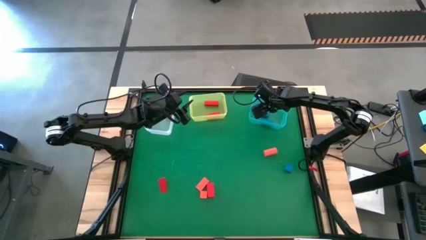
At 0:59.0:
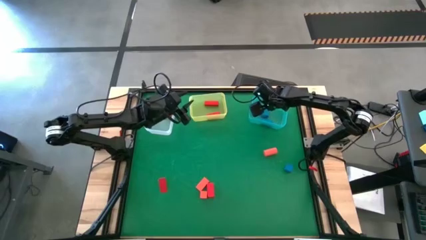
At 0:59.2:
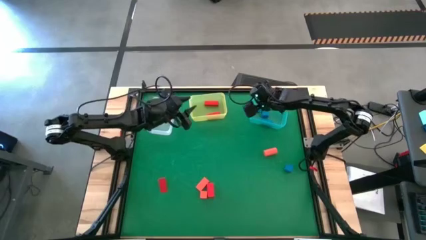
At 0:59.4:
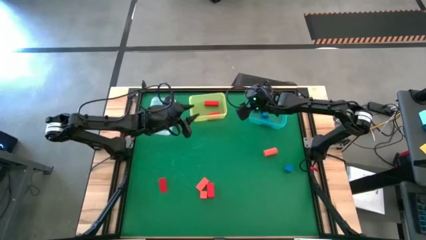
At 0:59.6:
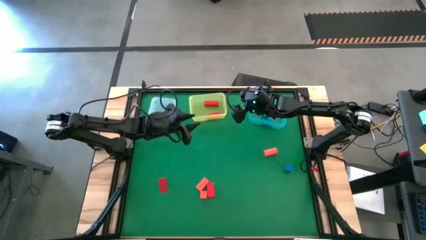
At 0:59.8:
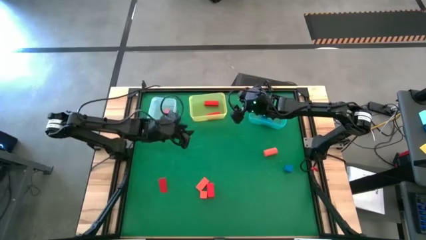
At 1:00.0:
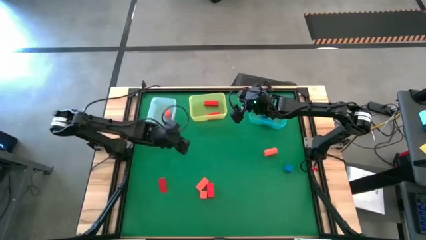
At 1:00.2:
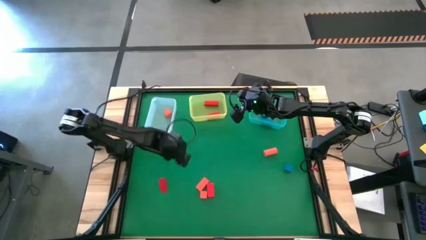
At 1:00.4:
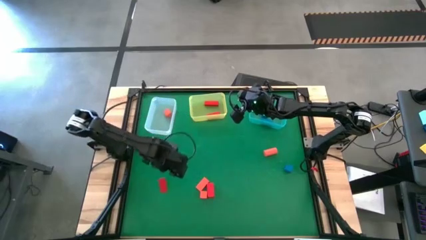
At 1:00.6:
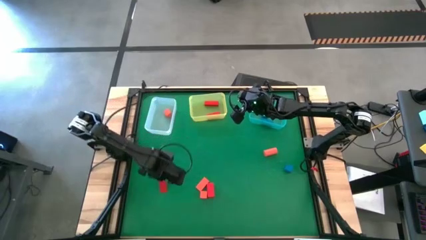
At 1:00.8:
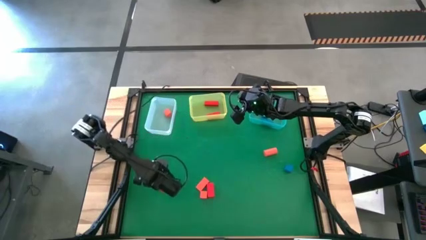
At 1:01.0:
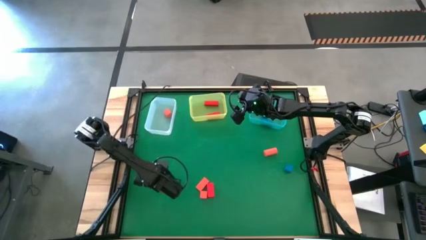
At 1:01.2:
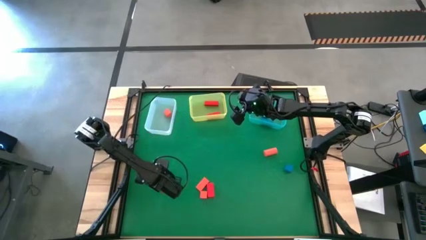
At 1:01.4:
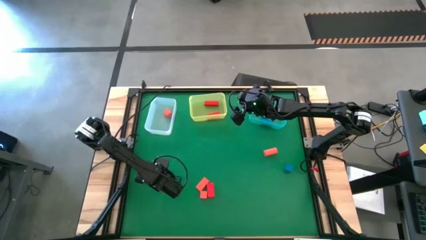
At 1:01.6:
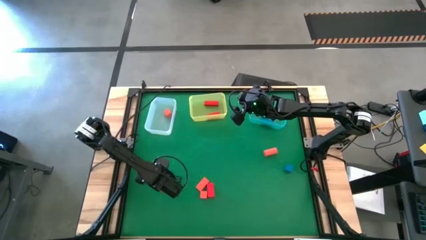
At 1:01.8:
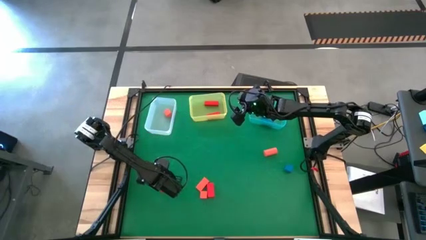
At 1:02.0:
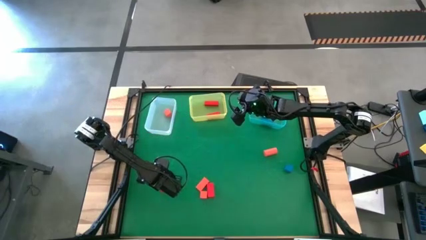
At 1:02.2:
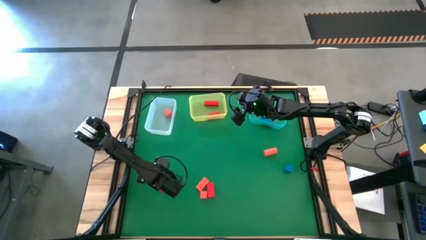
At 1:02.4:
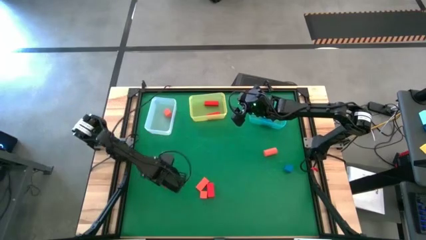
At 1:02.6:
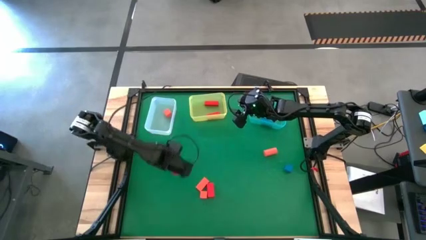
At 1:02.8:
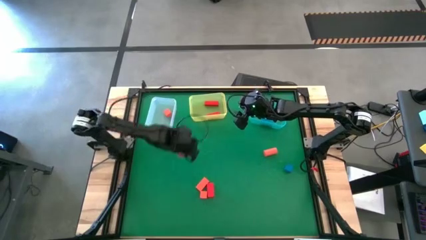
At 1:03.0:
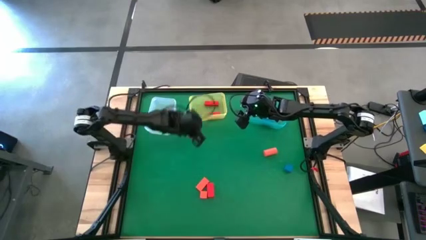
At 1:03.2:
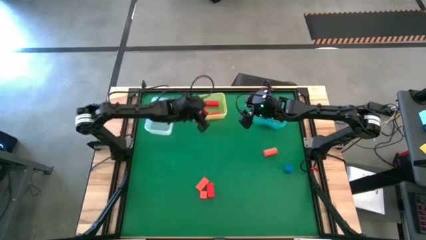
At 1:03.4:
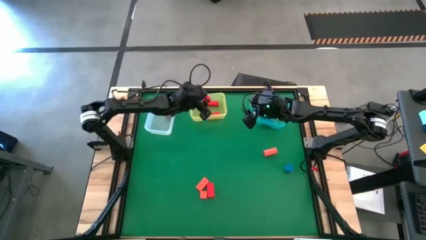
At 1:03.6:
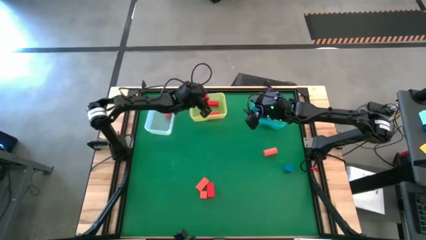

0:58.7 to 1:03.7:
Task: Sort & place blocks by color
Put the red block into the yellow bin

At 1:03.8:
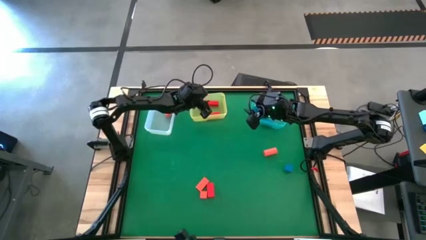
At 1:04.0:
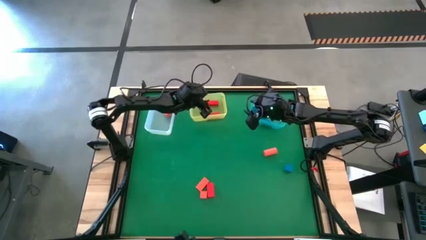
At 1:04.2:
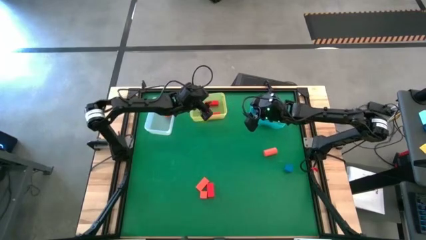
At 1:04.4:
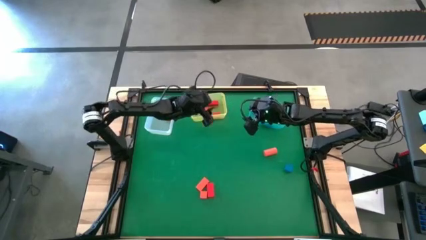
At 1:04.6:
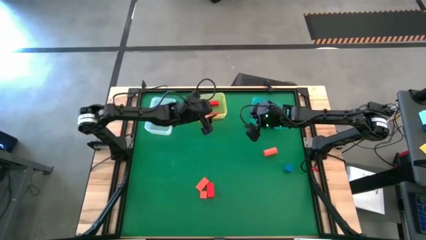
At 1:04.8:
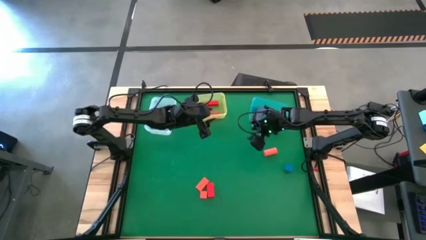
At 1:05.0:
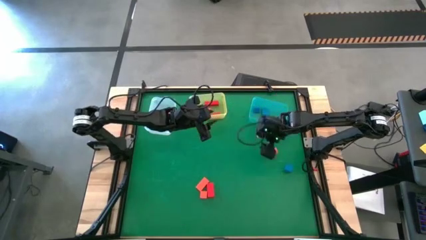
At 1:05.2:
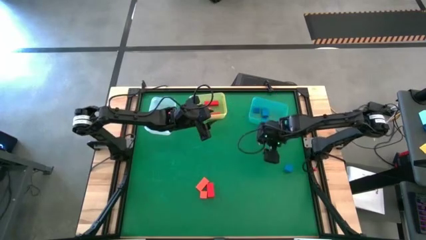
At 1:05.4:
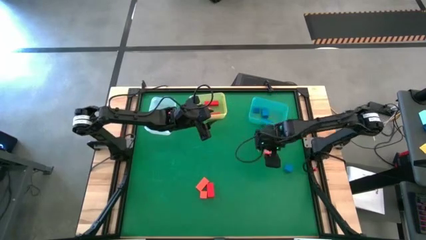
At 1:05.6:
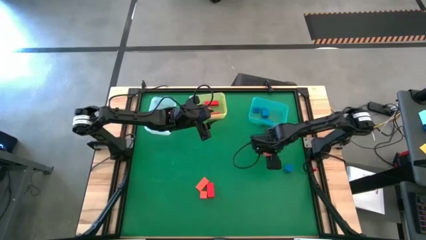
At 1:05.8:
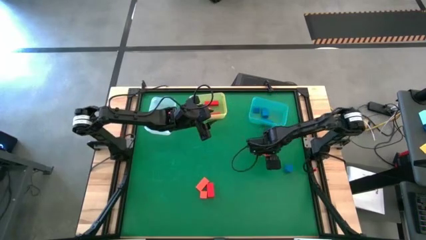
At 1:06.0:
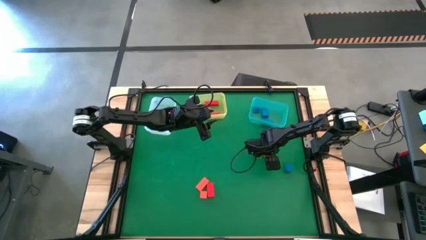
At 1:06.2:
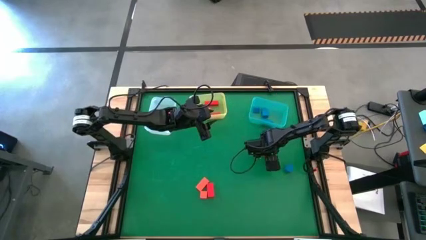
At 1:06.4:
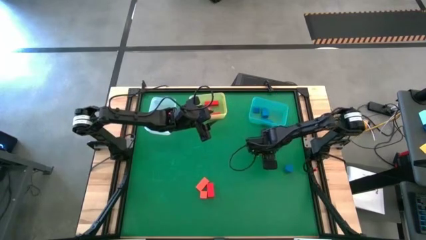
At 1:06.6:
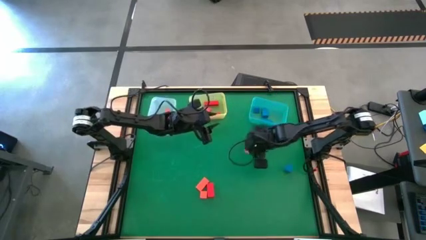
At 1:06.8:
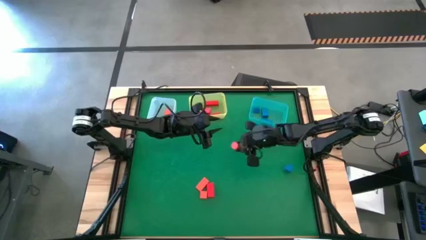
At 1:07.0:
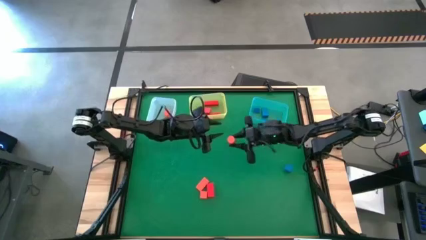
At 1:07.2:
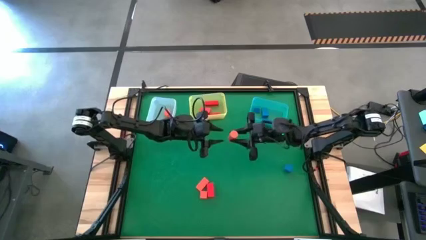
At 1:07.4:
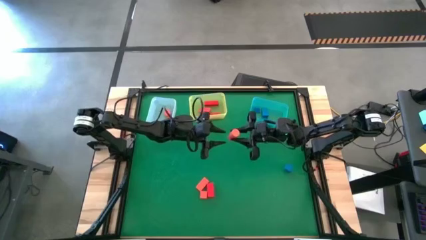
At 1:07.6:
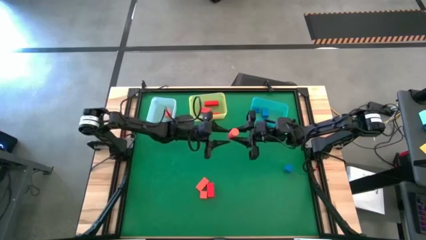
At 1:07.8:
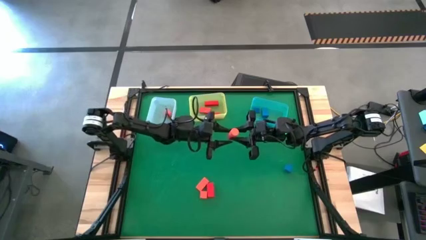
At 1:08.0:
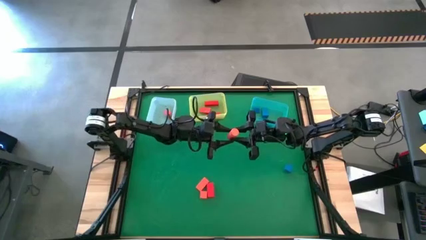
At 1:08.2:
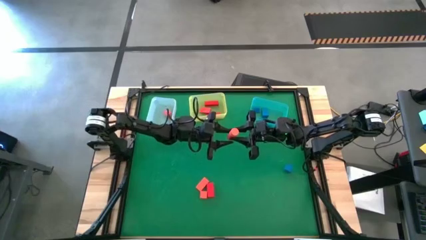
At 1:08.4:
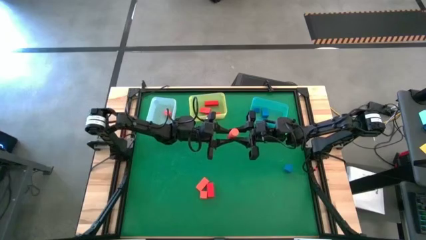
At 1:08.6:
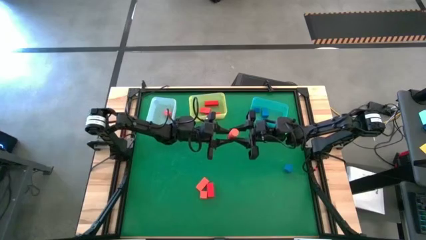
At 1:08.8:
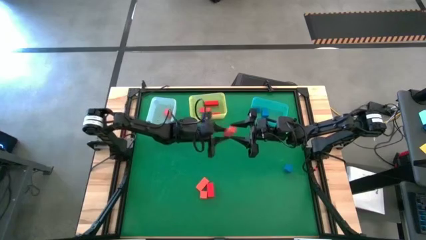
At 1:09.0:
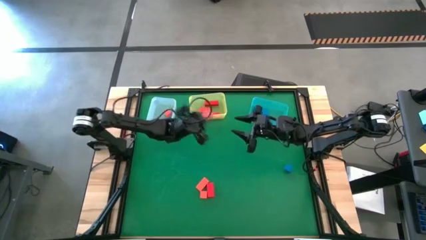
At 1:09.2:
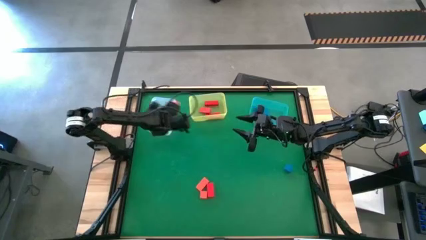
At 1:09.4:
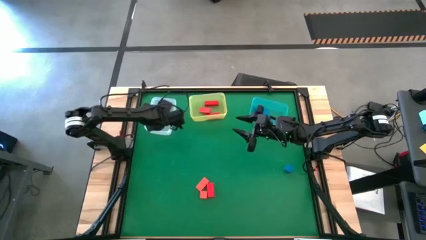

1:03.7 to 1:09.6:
Put the orange block into the transparent bin

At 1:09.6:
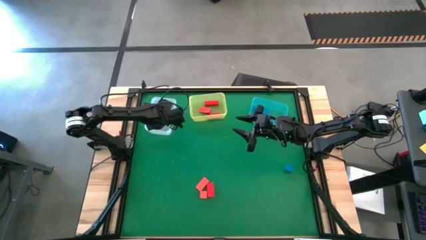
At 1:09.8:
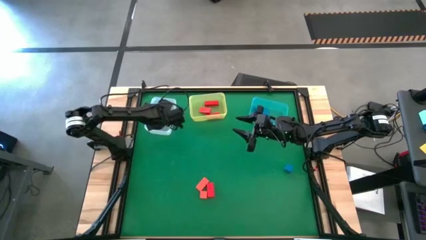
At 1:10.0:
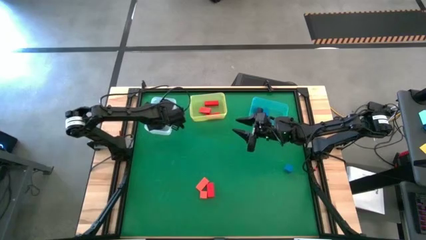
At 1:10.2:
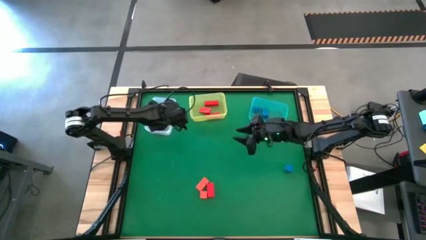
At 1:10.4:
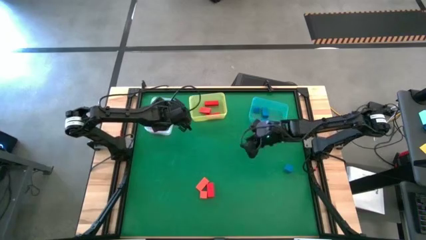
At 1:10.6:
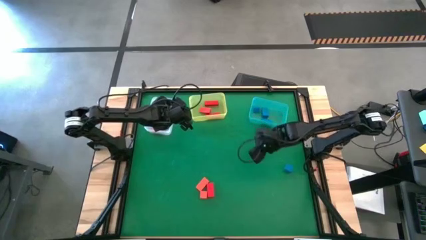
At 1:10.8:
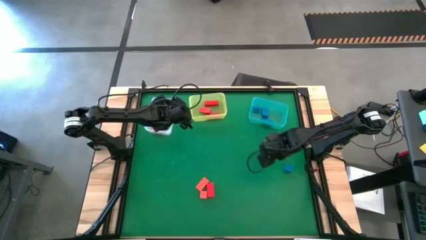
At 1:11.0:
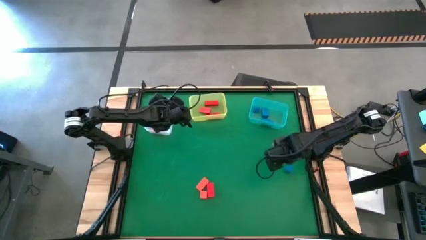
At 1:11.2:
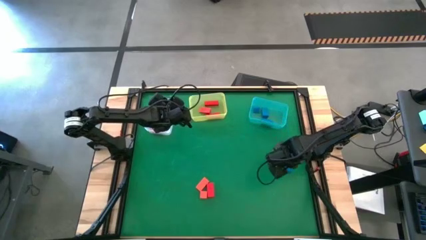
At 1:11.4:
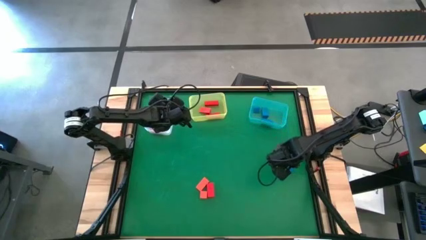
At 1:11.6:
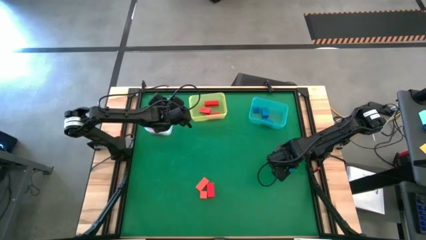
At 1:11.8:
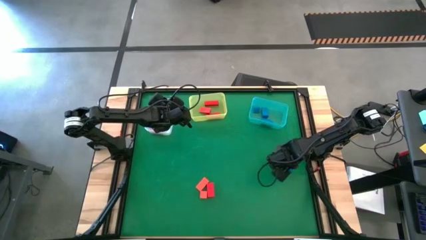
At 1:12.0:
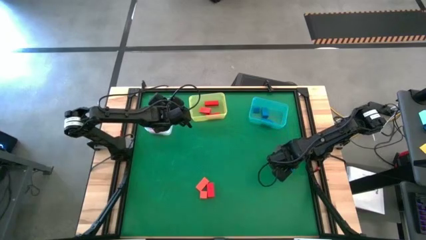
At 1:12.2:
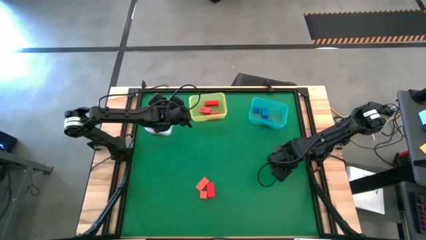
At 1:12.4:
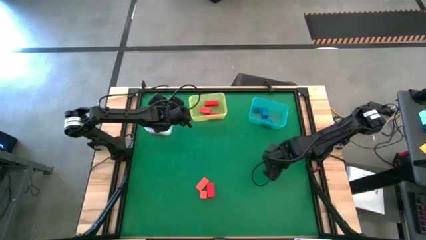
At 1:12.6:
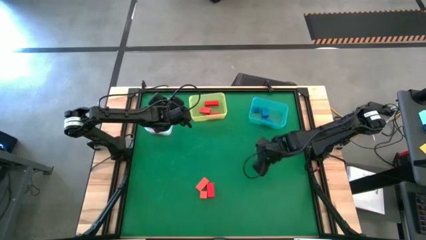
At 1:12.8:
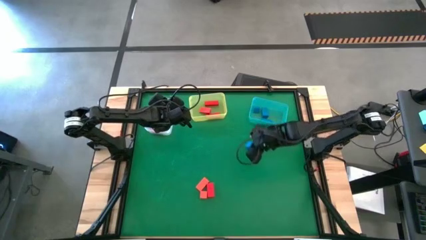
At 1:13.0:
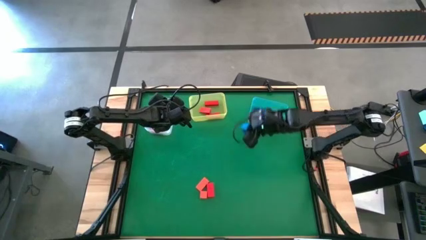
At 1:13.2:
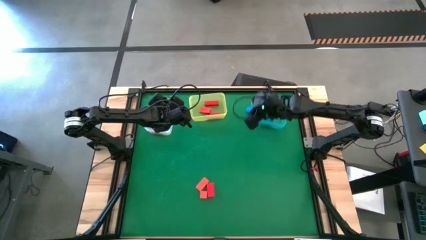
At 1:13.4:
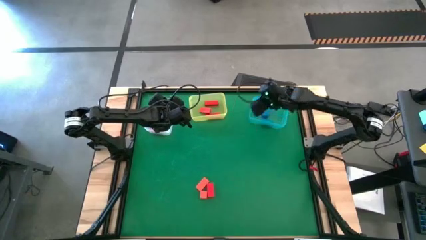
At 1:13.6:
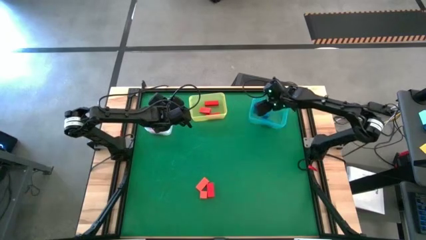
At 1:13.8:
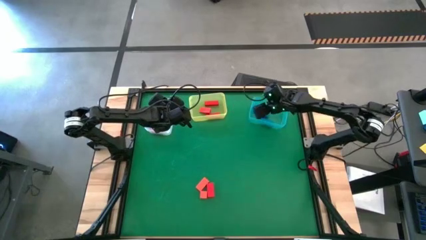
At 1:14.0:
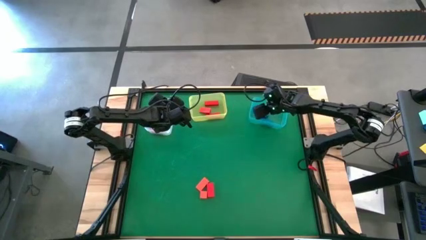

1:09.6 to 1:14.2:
Put the blue block into the blue bin
